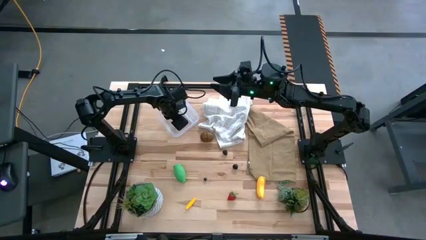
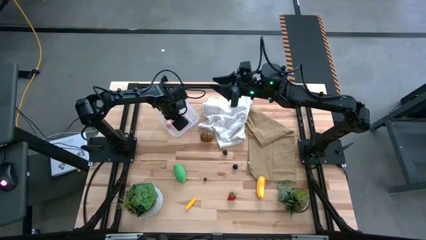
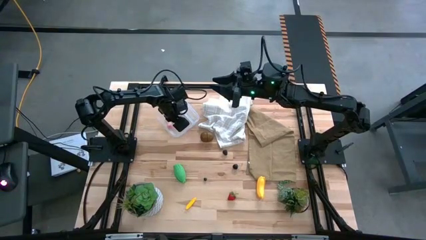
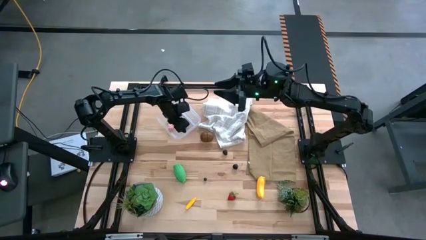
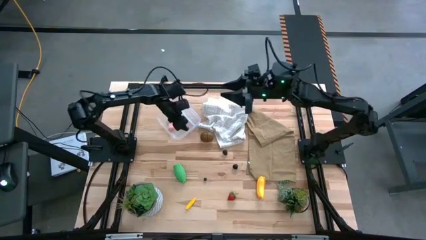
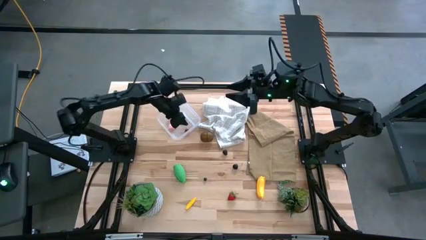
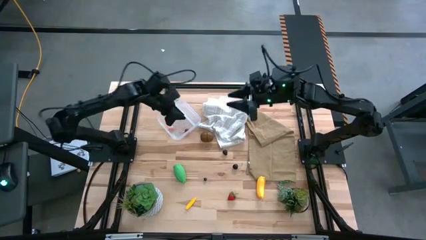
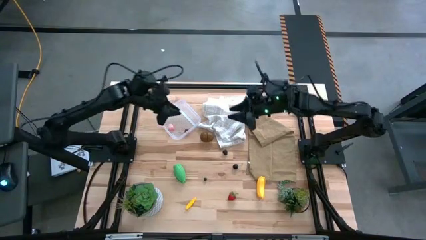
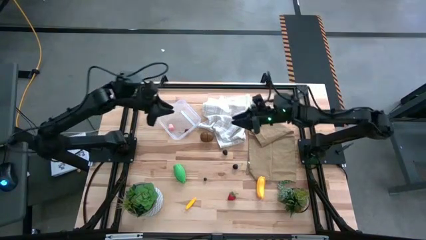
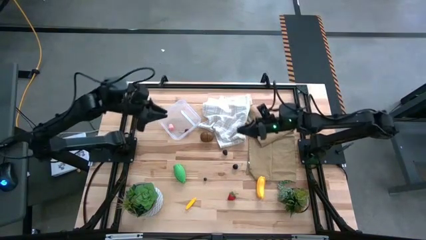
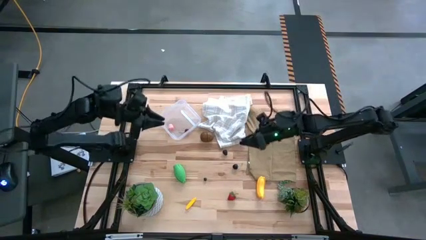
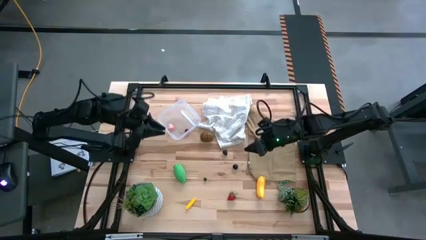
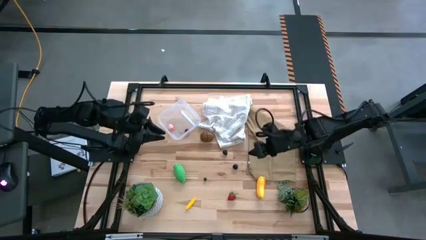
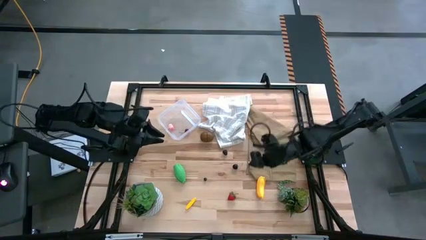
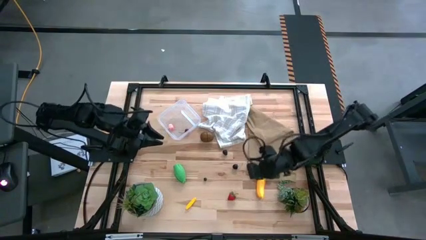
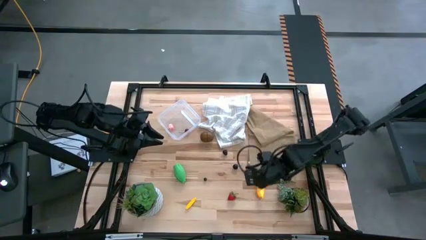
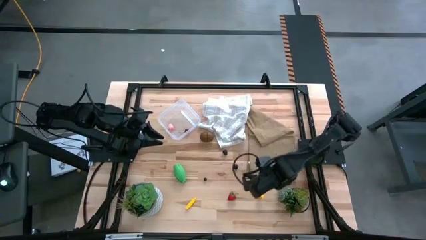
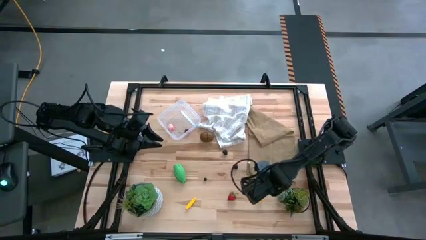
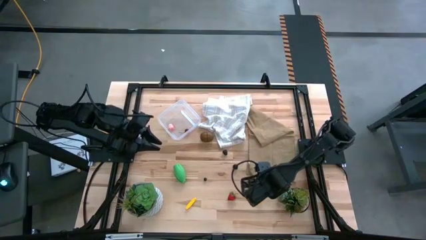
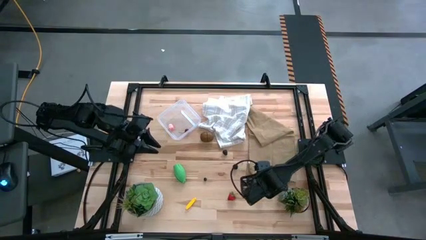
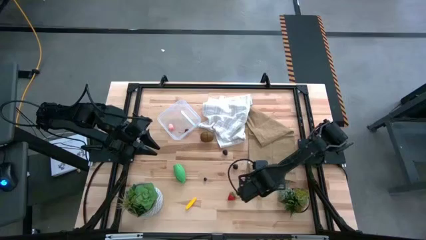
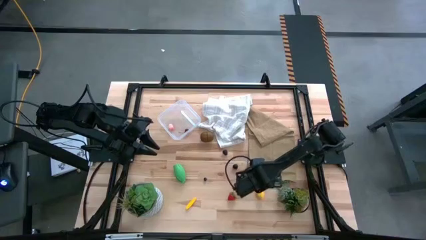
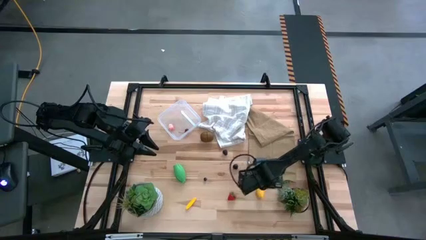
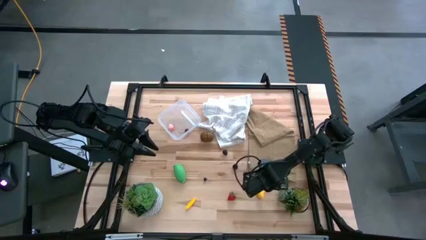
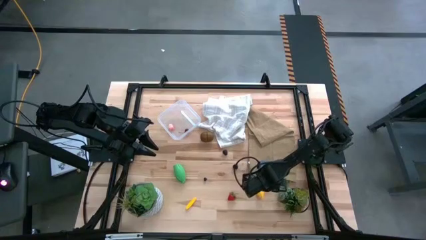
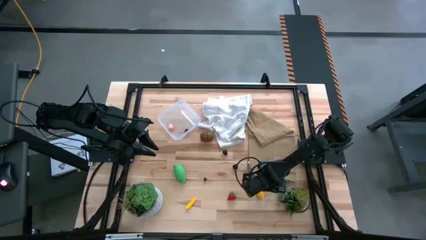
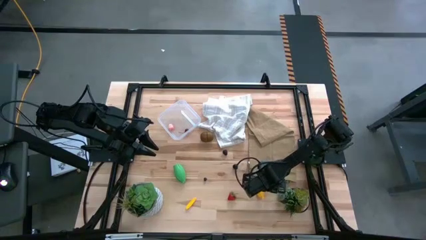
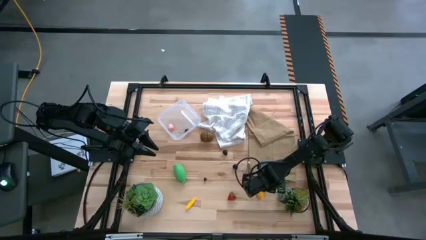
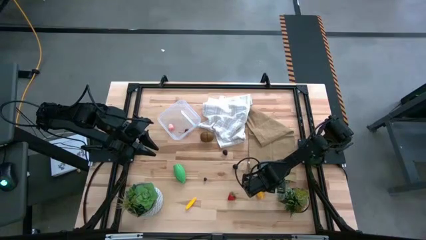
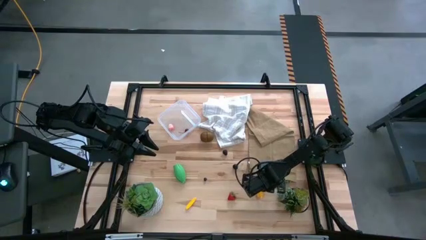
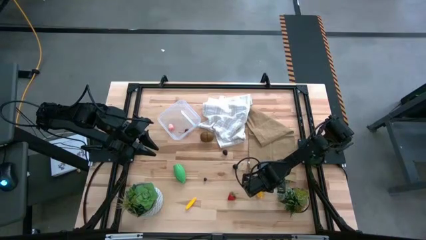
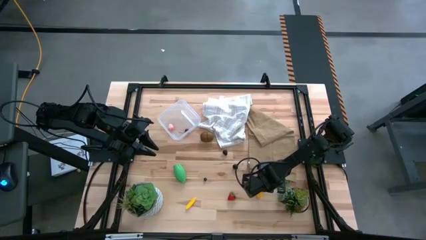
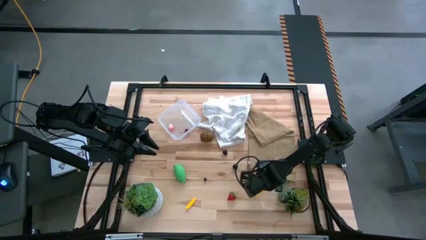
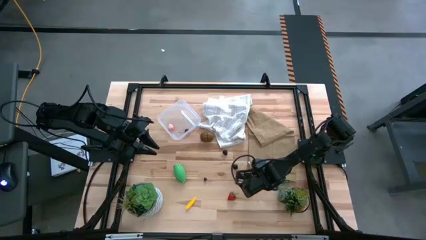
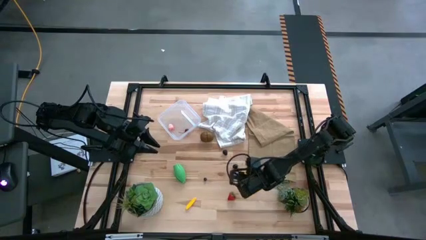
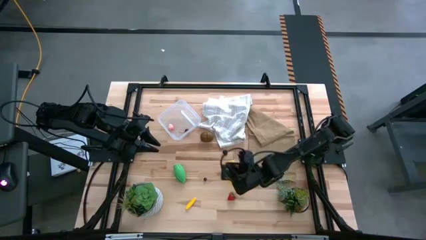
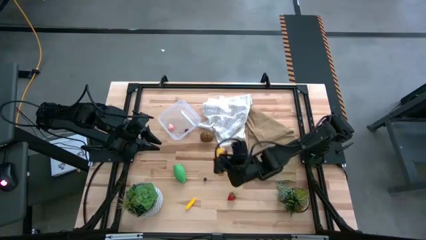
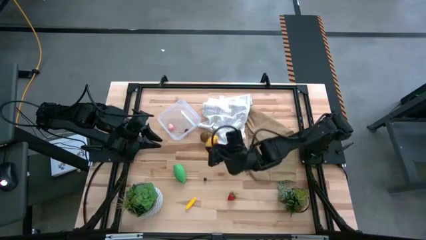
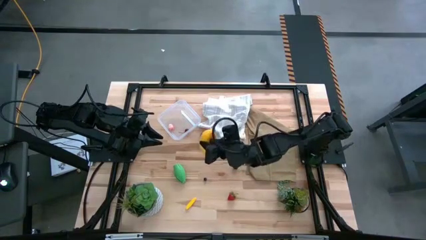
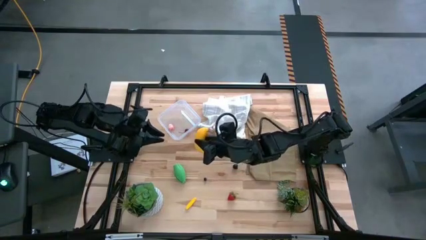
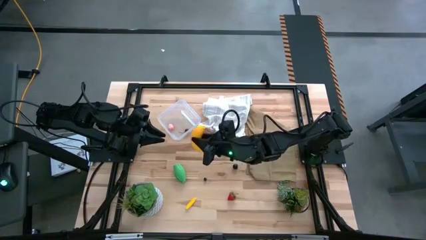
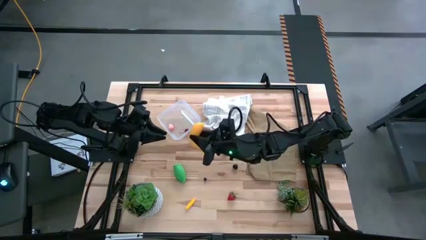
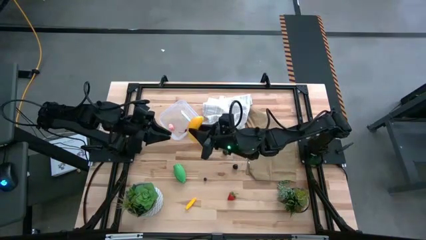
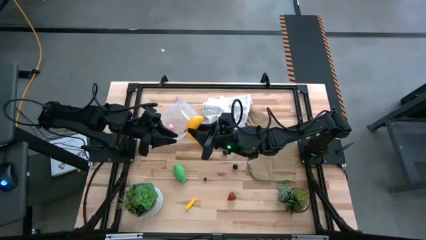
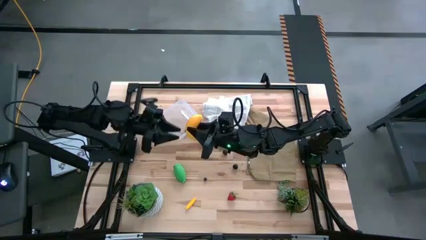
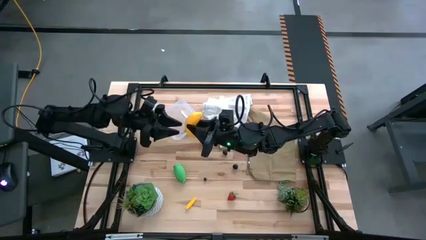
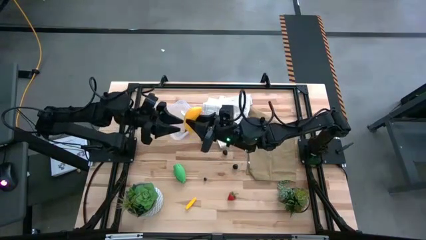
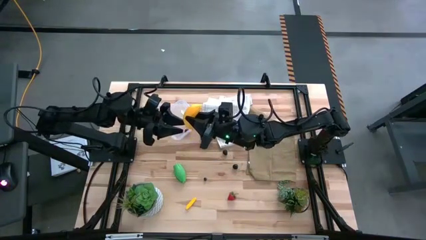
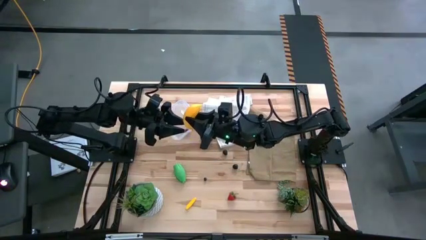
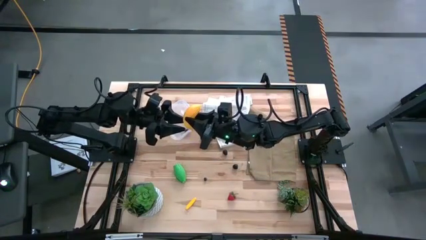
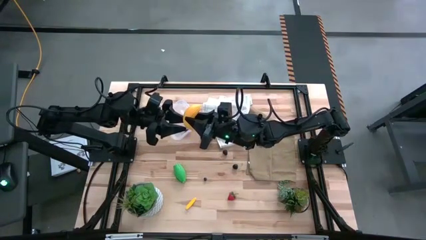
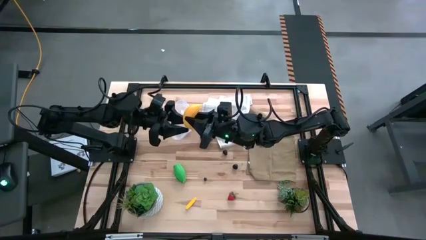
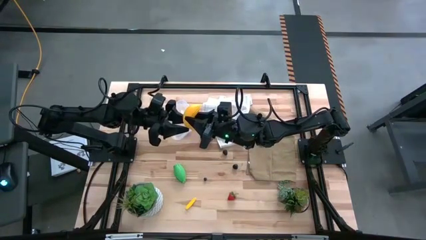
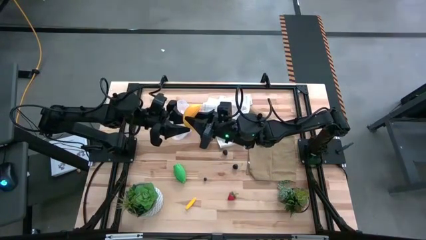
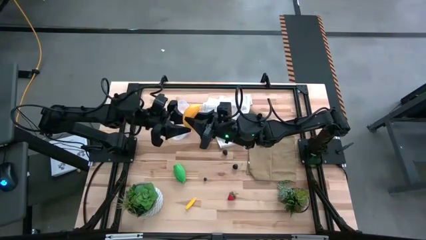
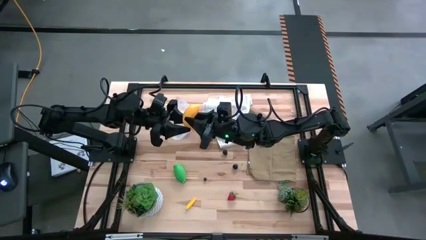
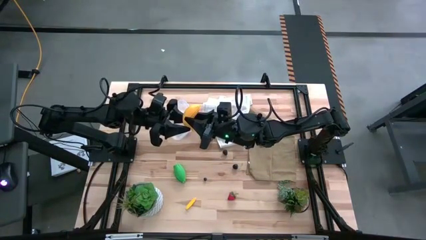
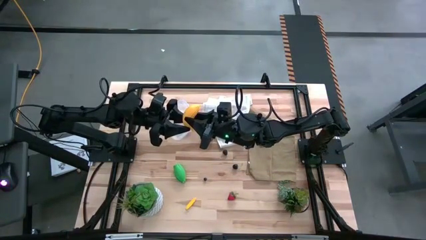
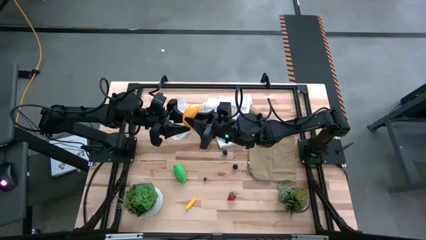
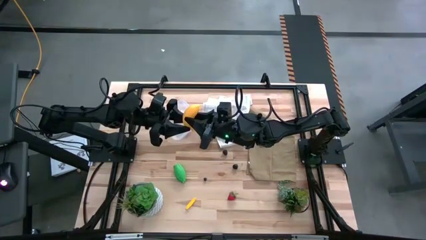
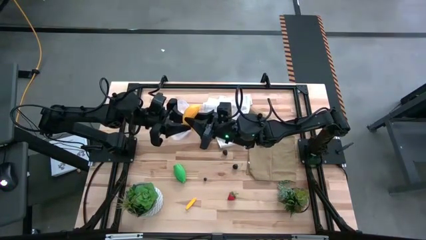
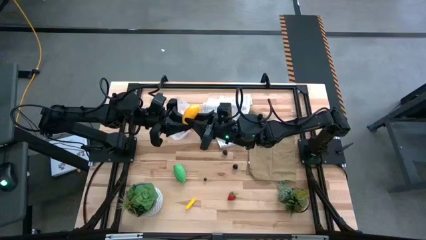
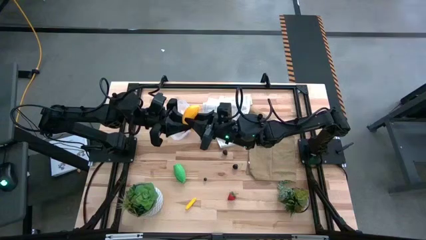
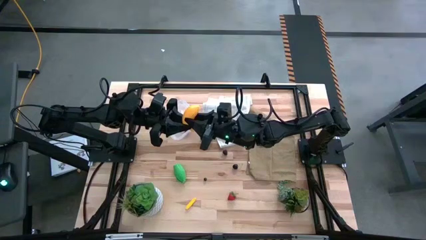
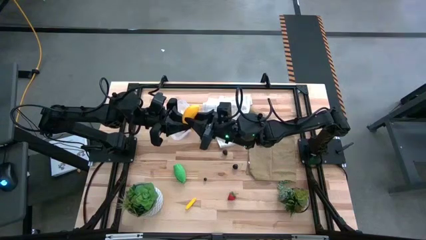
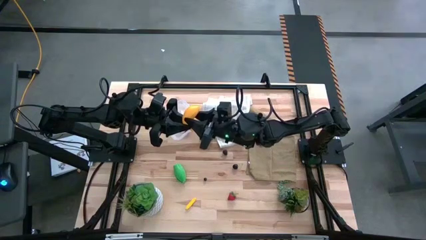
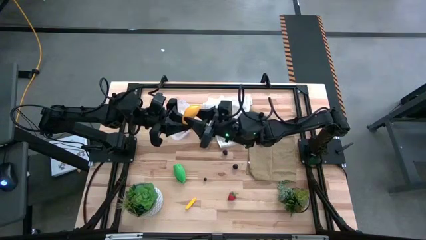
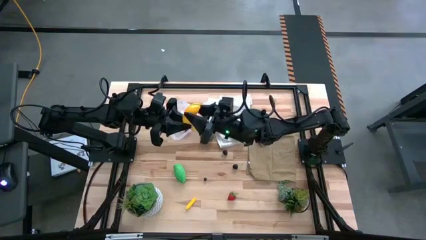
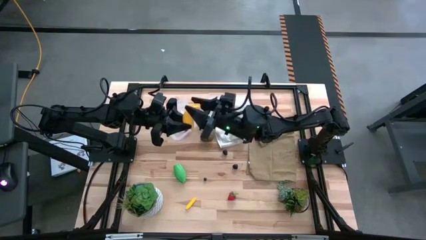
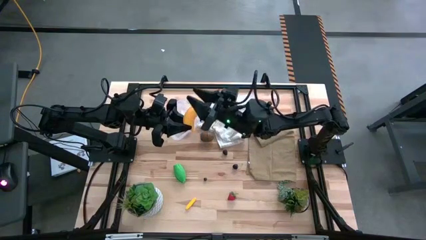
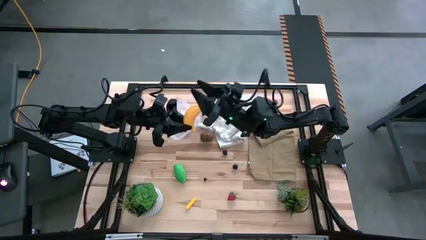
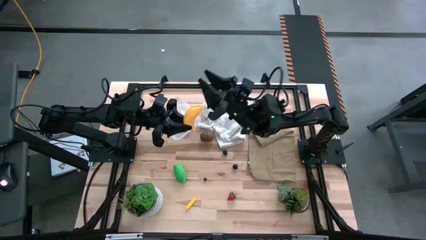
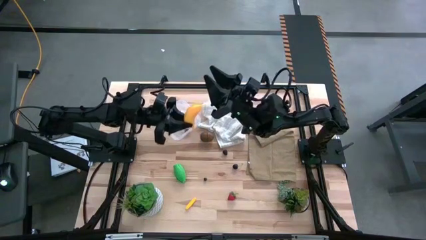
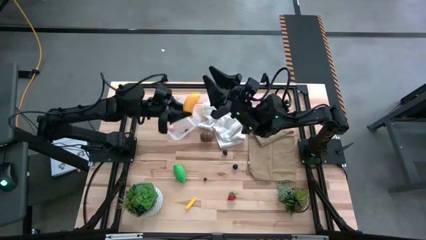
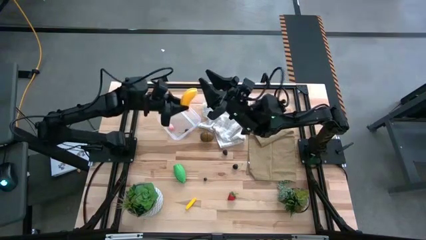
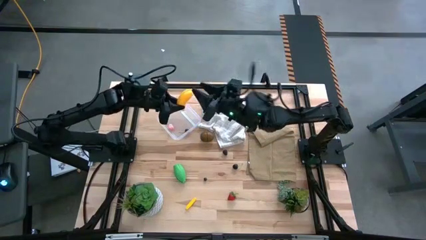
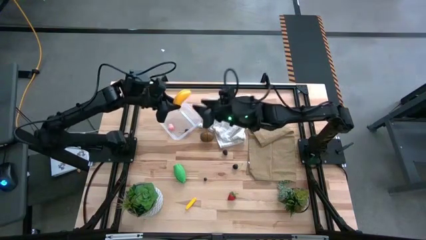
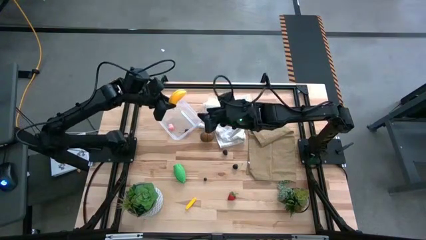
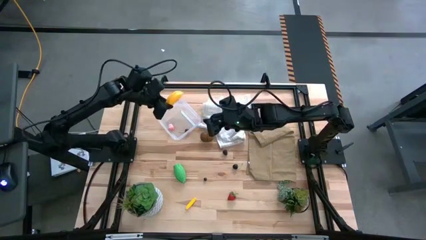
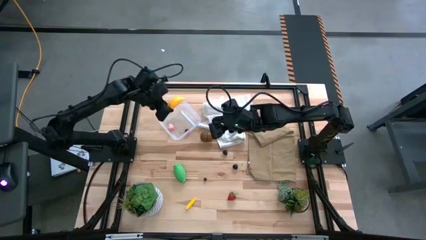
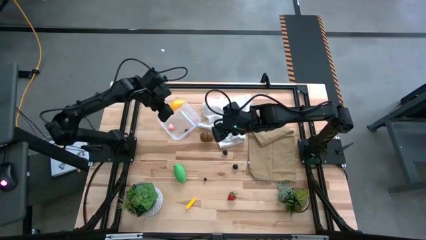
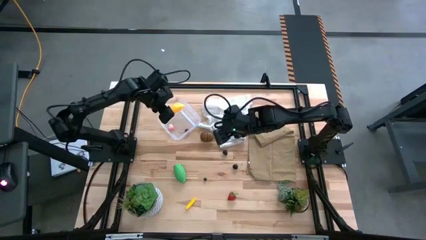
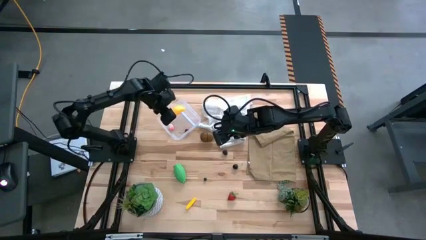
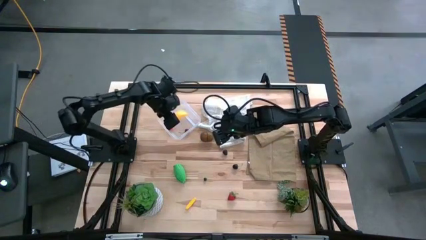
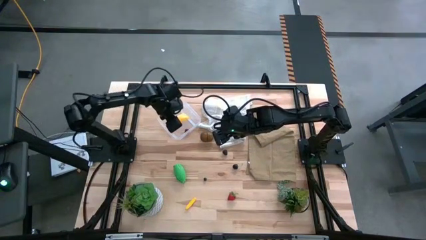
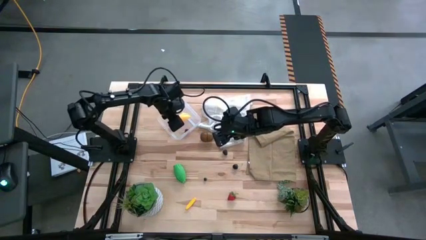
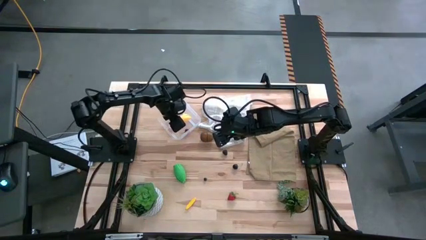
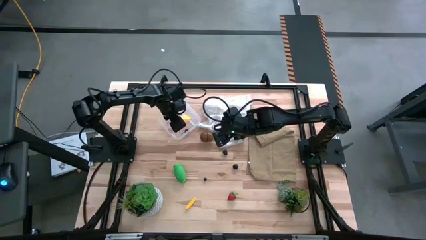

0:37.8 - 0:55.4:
Task: Pick and placing Produce into tupperware
Put the yellow banana into the transparent bin
